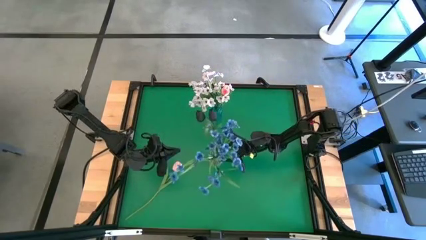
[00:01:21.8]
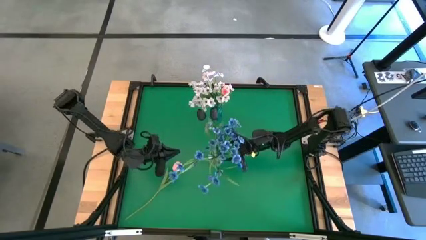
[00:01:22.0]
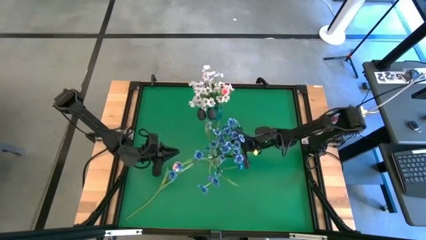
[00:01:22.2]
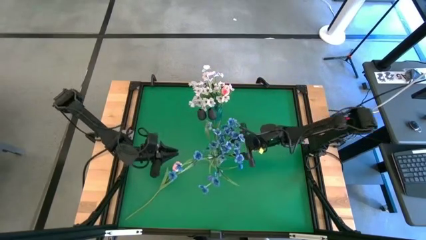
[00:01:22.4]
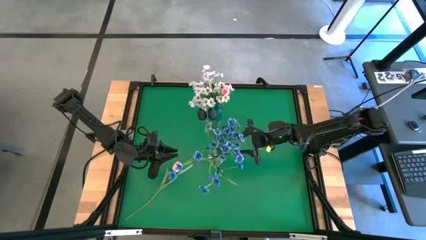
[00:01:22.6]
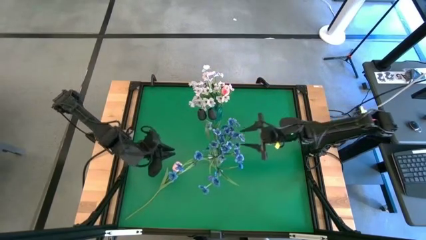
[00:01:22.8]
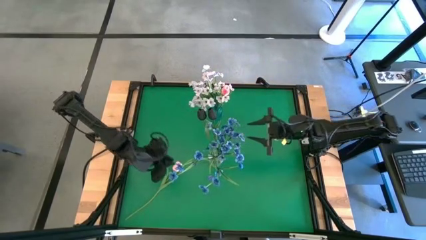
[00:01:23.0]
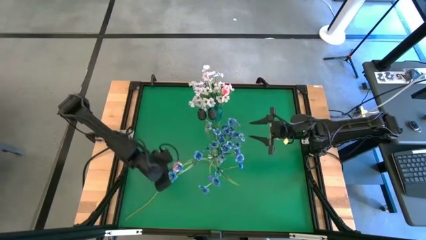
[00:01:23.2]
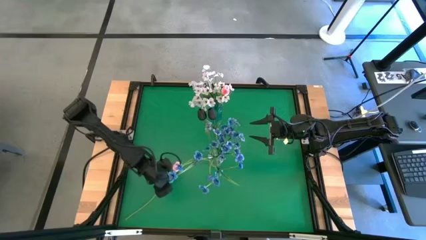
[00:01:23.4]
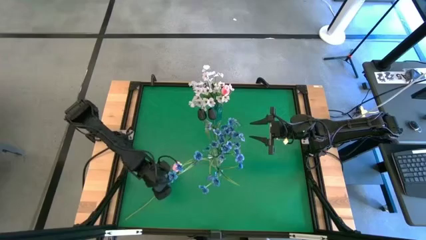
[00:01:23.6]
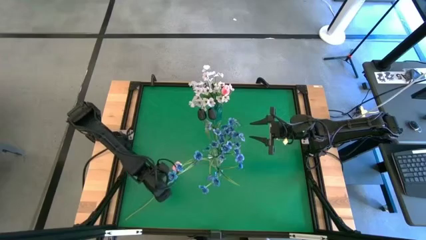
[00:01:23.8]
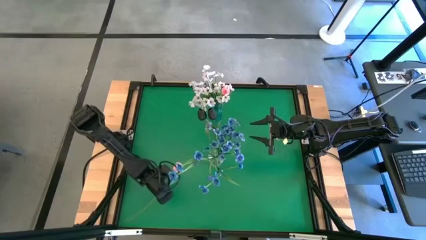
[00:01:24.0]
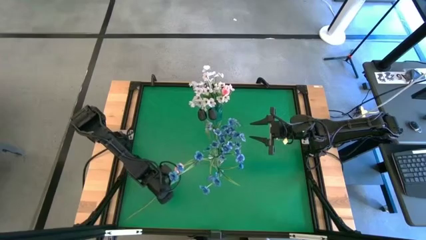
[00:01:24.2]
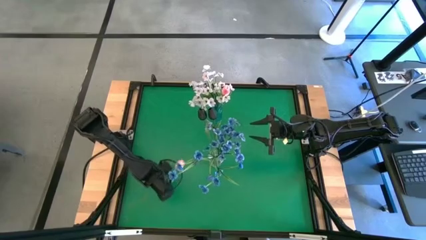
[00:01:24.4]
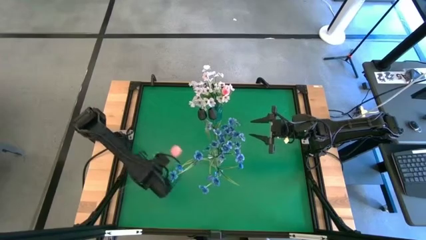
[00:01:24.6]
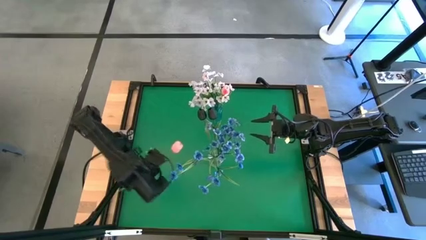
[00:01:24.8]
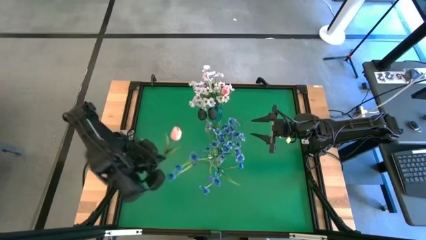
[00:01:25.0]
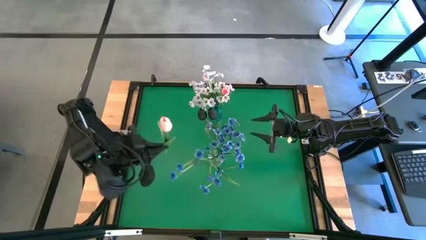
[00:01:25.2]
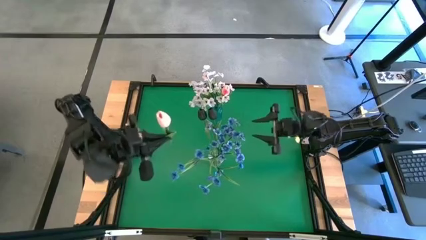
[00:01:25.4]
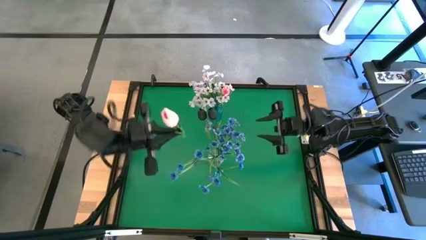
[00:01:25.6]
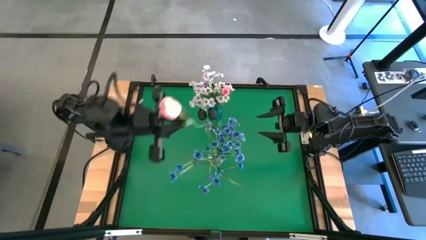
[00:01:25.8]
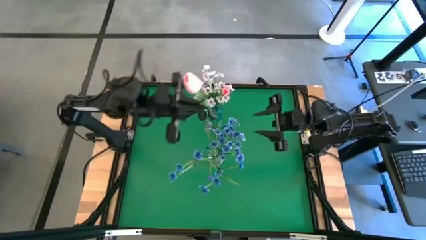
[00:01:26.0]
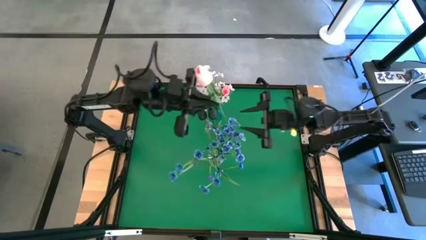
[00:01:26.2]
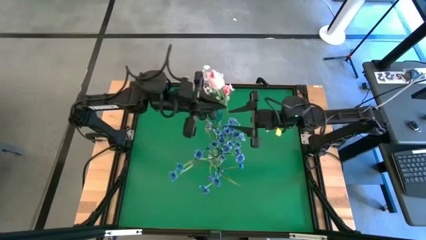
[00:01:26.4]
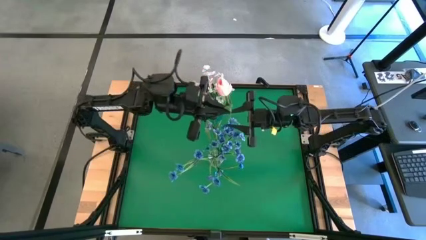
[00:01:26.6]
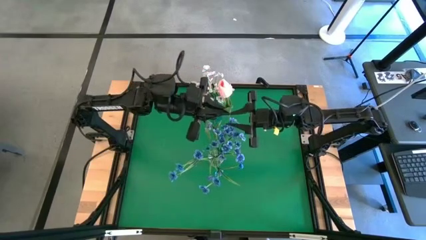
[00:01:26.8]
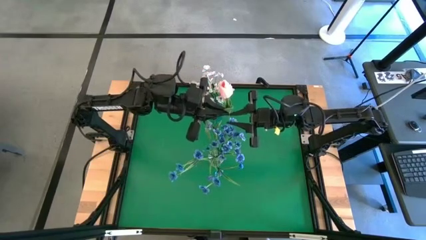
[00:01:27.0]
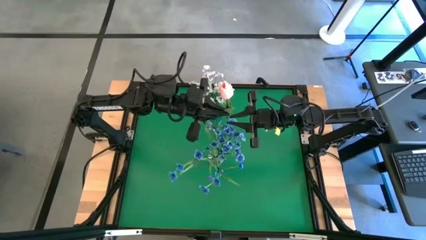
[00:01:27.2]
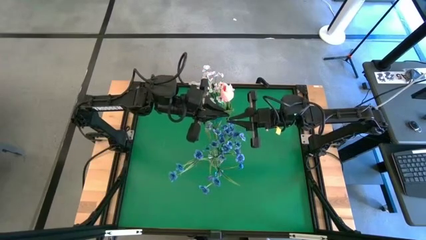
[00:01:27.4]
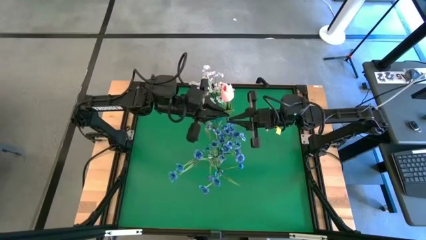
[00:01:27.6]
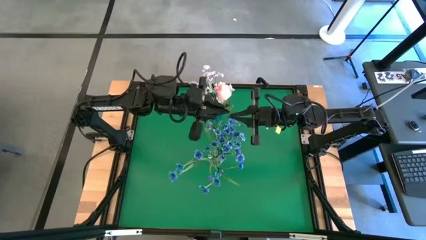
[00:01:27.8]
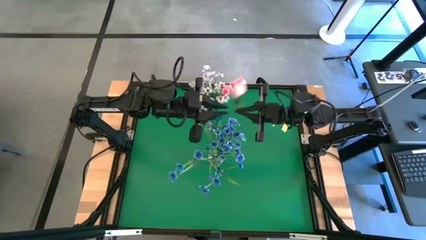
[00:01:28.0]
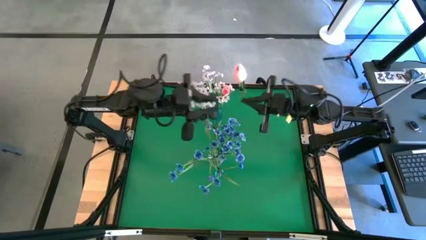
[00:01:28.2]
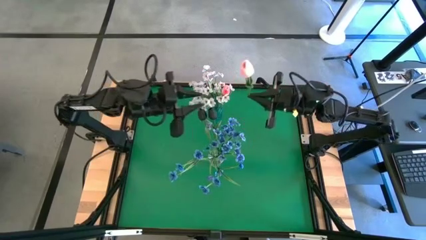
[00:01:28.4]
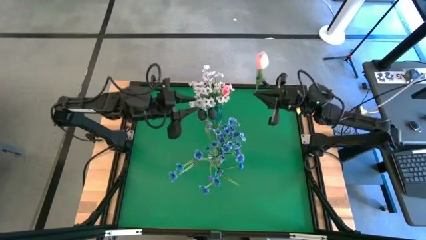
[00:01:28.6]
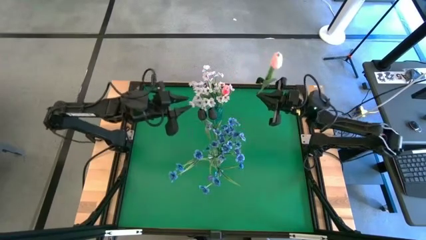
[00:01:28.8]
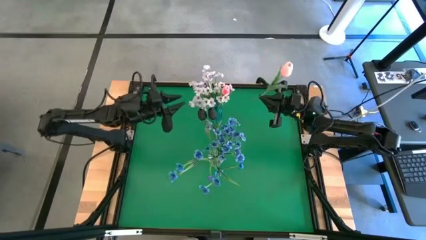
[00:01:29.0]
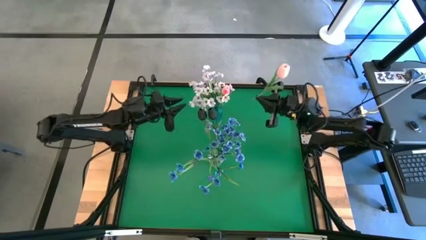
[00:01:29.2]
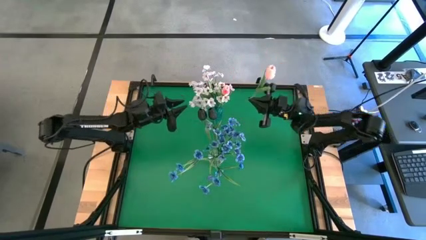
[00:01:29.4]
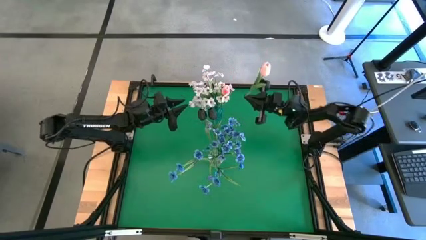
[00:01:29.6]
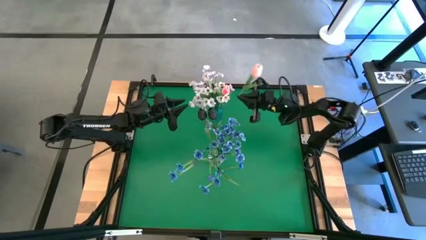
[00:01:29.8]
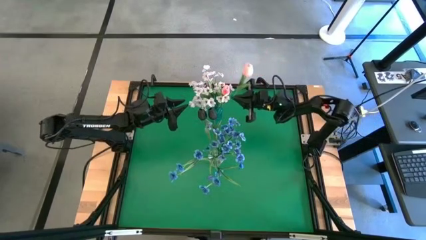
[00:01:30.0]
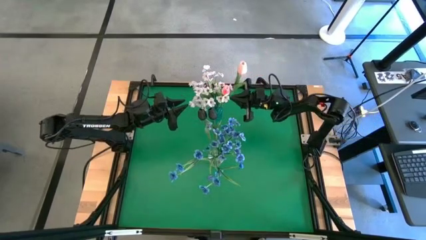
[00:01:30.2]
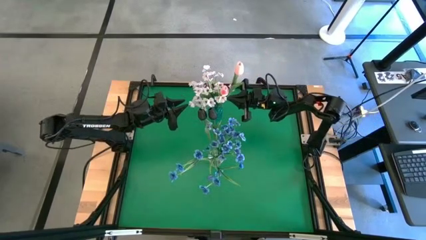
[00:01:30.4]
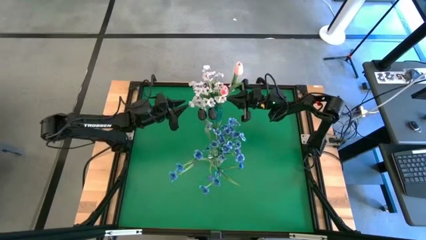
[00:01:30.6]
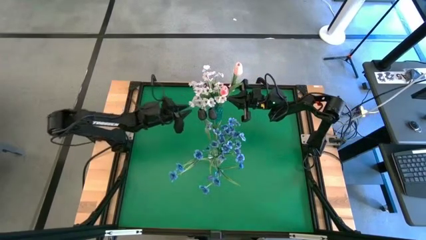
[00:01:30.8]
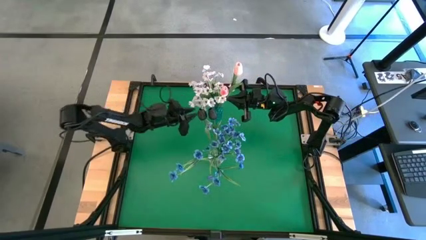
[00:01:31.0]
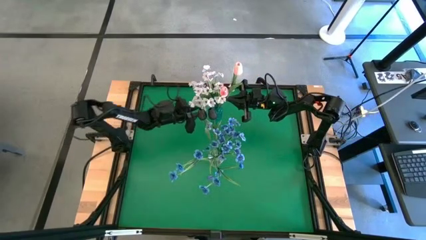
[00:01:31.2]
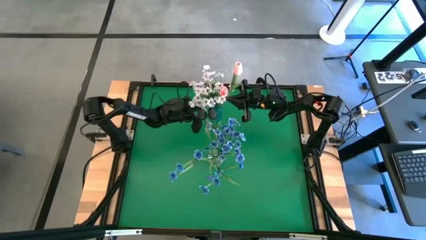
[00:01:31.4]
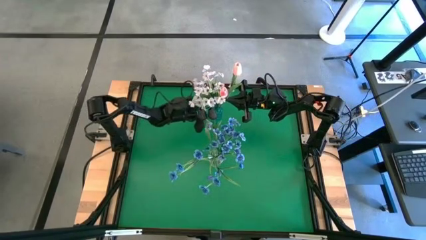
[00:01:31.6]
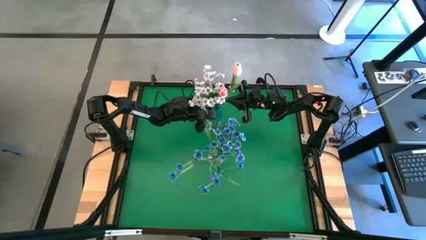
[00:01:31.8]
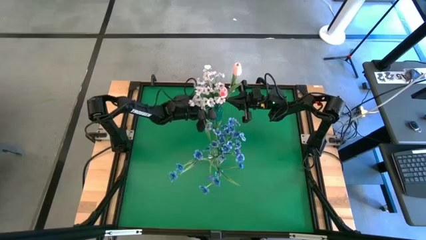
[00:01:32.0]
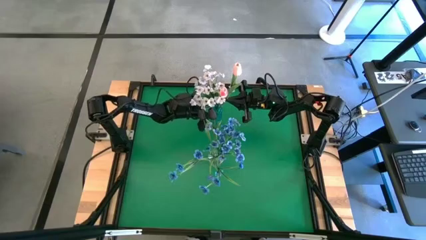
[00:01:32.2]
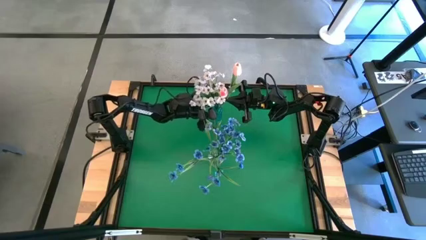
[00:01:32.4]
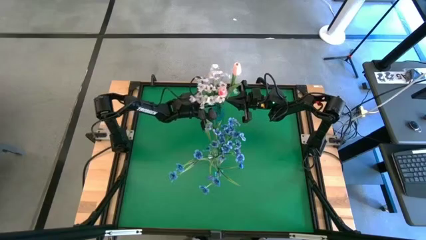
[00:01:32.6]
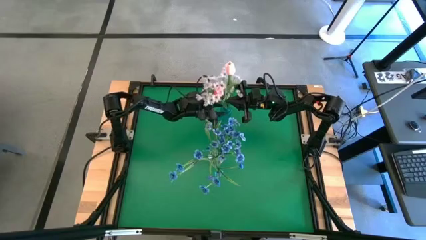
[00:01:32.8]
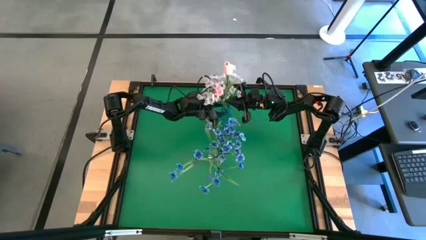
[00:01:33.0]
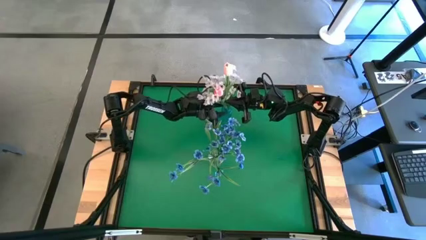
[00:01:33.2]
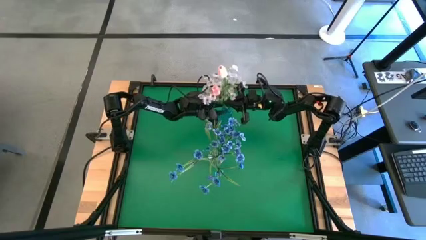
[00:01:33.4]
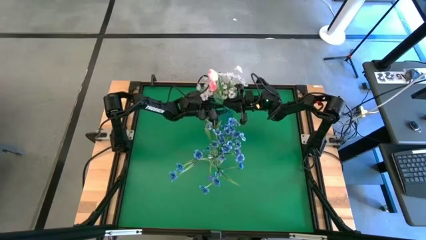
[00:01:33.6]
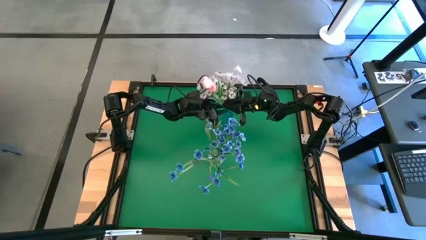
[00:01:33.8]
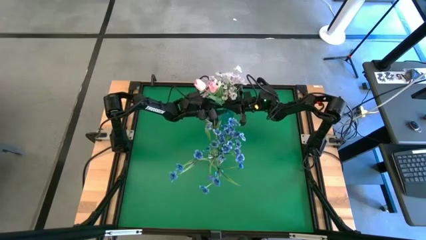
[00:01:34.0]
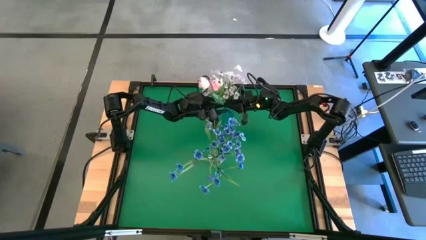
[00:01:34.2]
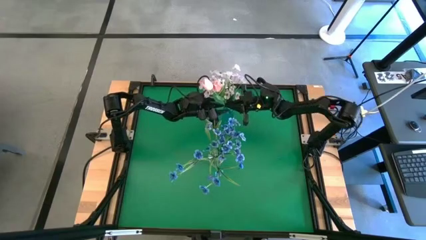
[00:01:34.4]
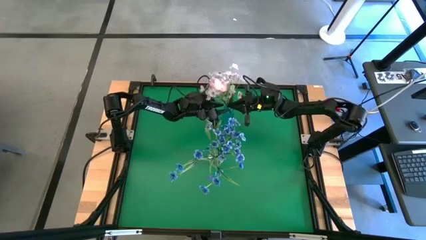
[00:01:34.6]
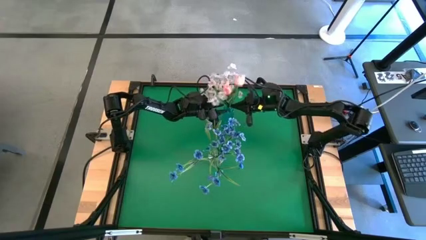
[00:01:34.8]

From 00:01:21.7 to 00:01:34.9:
Task: Sort flowers into vase by color
Put the pink tulip into the blue vase

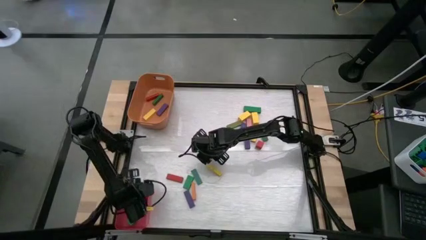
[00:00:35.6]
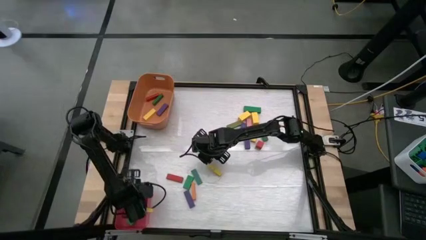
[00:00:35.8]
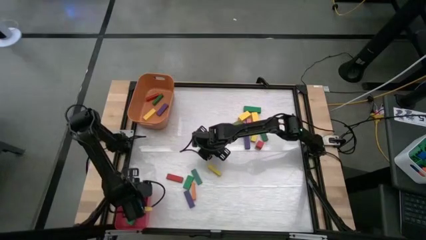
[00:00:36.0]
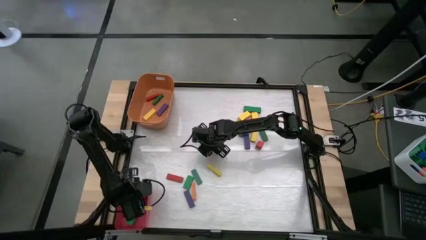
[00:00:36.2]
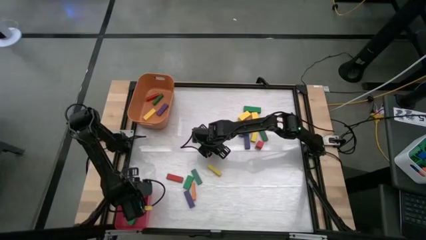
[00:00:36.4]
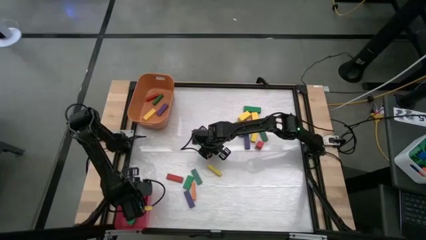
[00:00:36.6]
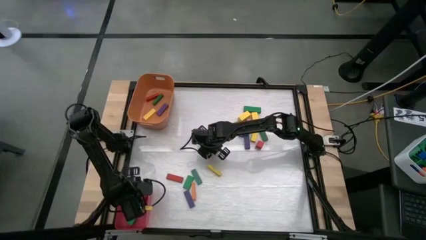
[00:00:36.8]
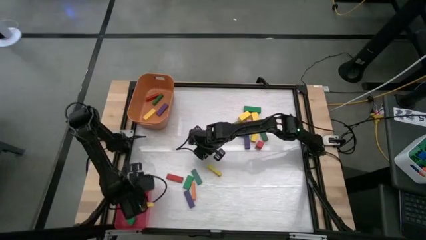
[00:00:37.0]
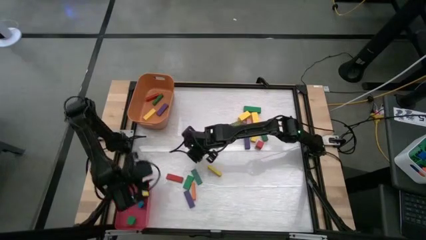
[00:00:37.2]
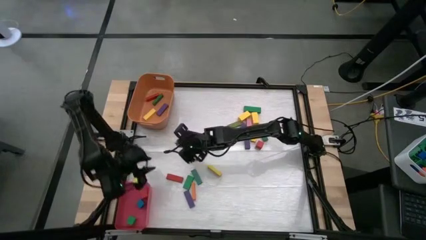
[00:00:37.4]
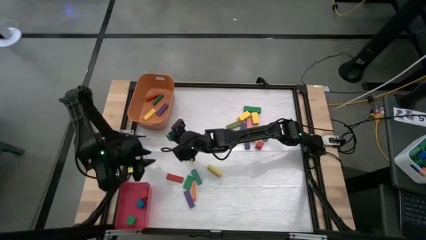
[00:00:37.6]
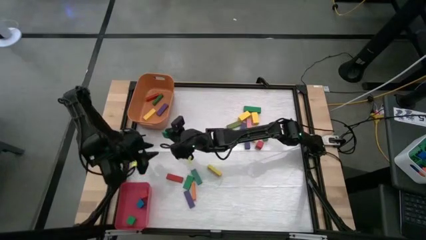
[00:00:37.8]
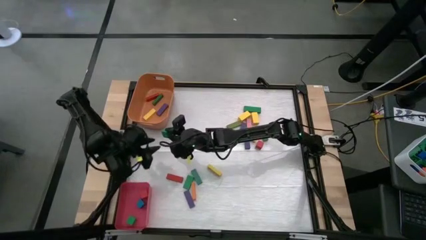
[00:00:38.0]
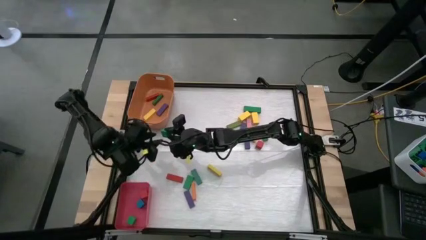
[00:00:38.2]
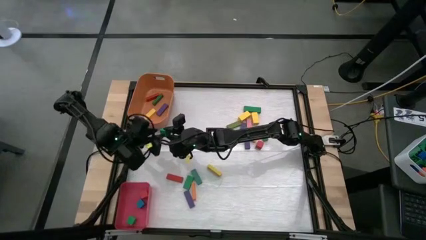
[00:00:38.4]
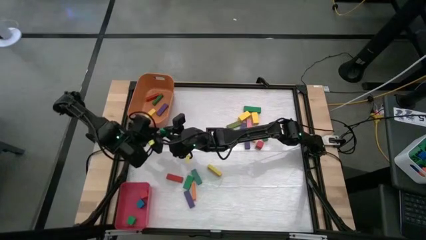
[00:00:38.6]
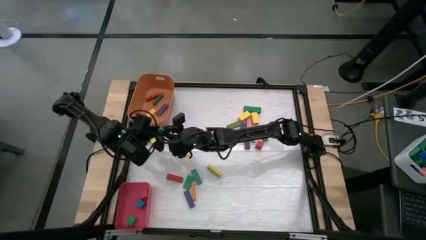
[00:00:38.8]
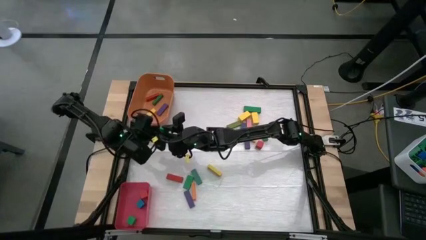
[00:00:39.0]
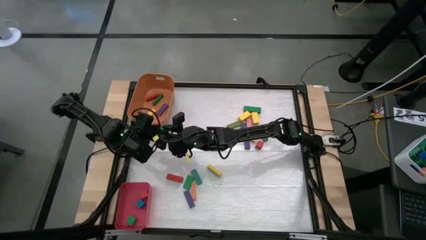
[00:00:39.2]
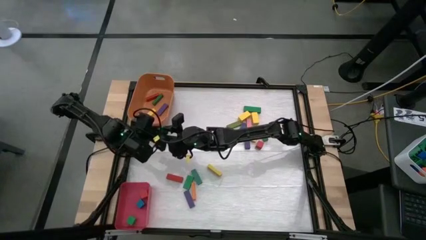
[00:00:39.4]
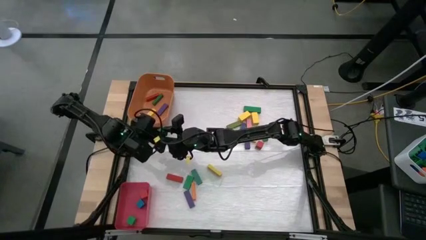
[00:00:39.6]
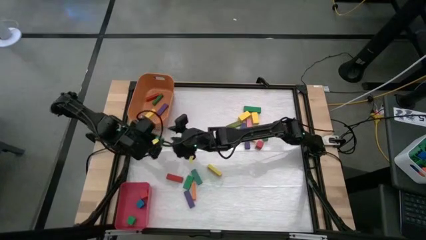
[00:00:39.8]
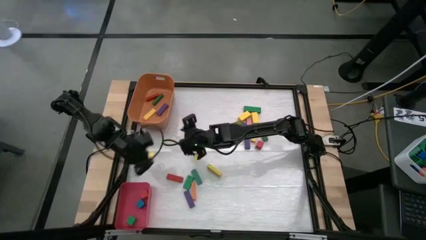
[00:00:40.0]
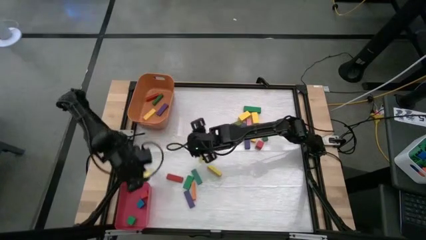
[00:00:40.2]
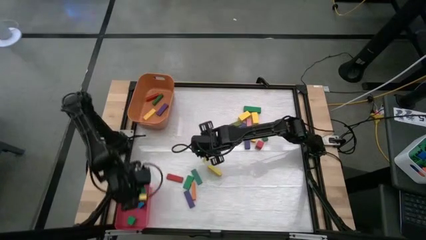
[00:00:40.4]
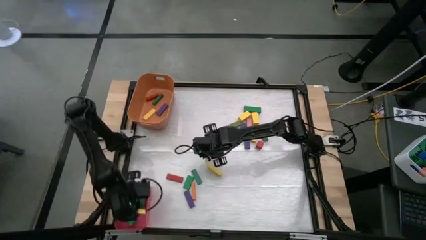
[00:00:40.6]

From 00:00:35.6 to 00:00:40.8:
Task: Sort blocks by size
Put the small green block into the red bin
